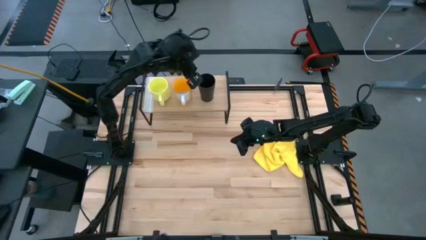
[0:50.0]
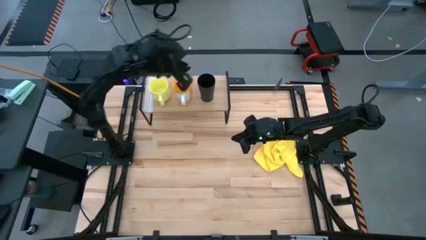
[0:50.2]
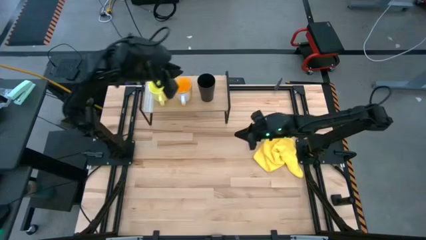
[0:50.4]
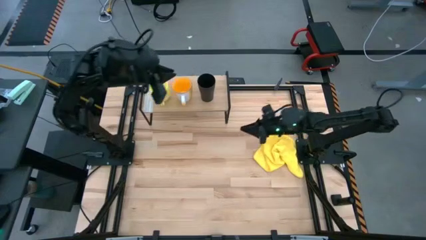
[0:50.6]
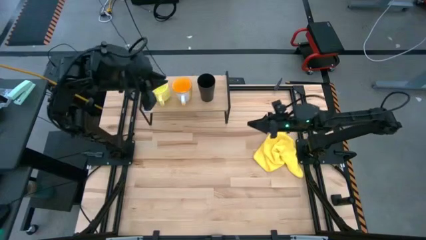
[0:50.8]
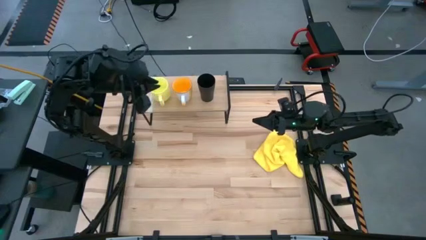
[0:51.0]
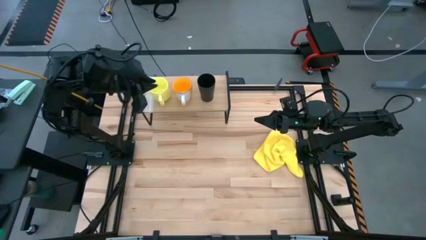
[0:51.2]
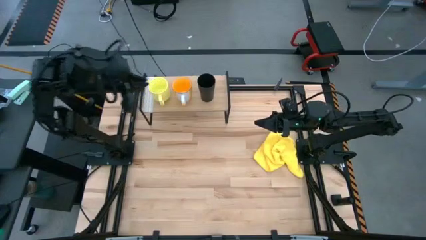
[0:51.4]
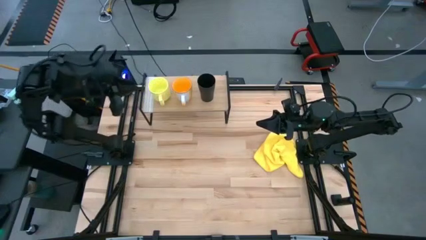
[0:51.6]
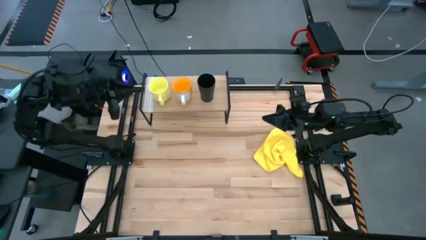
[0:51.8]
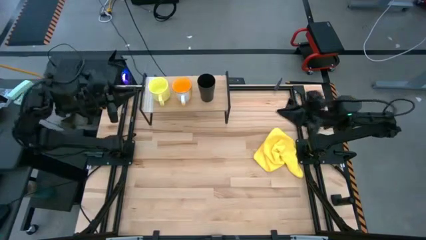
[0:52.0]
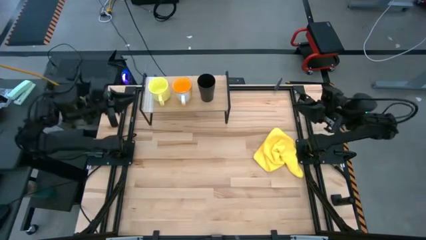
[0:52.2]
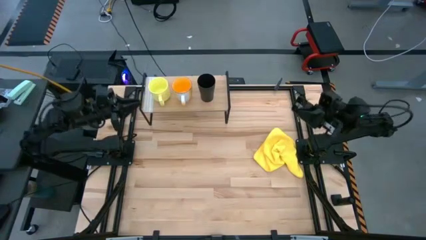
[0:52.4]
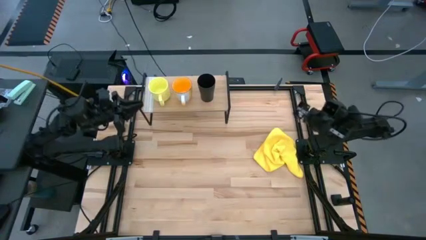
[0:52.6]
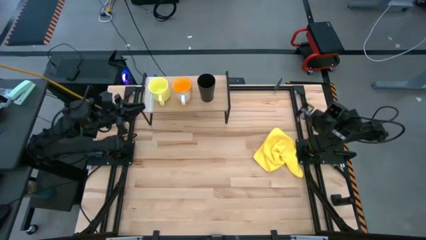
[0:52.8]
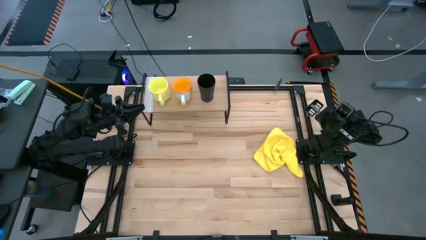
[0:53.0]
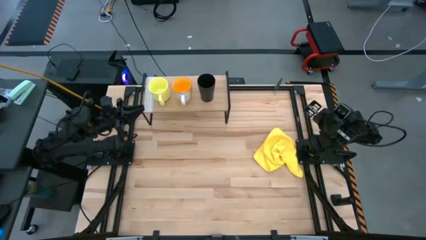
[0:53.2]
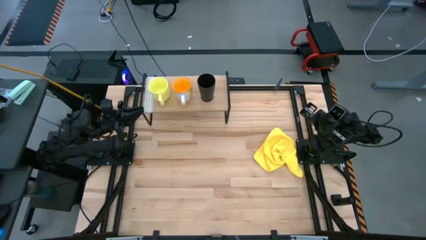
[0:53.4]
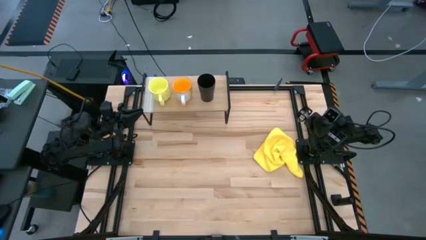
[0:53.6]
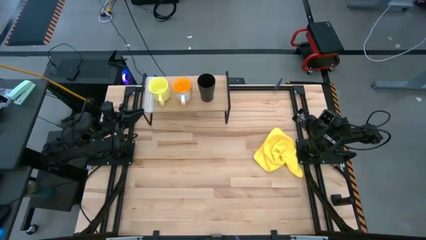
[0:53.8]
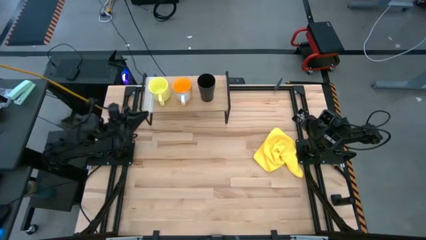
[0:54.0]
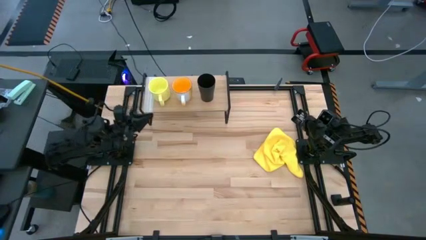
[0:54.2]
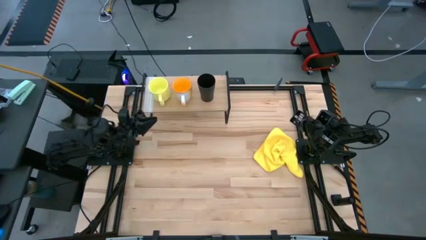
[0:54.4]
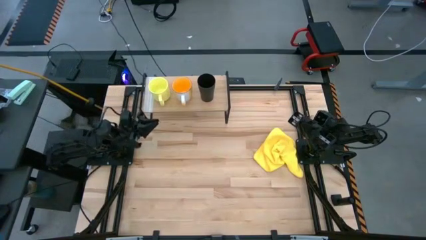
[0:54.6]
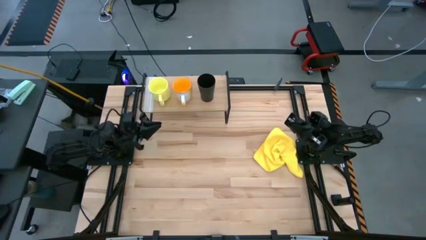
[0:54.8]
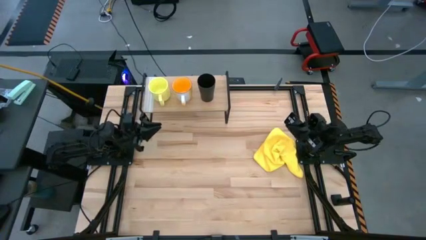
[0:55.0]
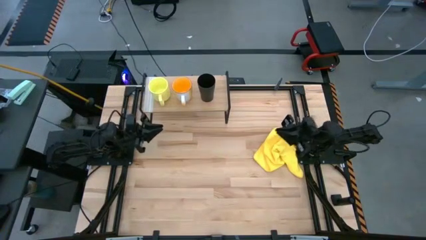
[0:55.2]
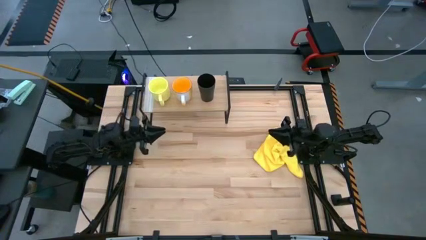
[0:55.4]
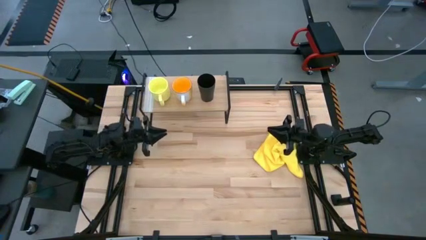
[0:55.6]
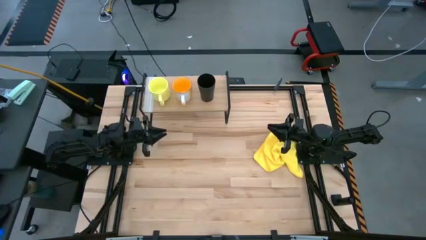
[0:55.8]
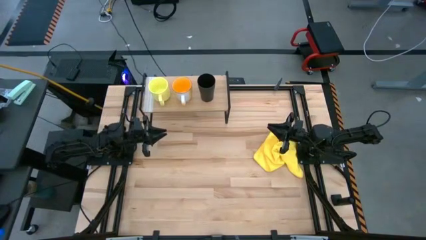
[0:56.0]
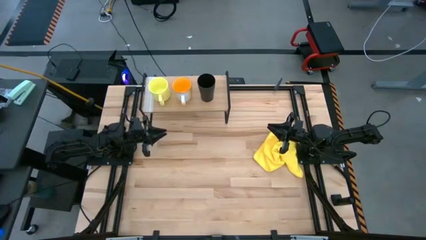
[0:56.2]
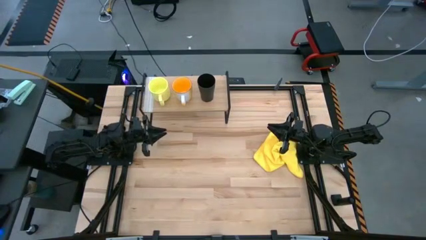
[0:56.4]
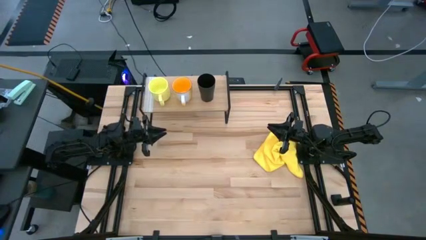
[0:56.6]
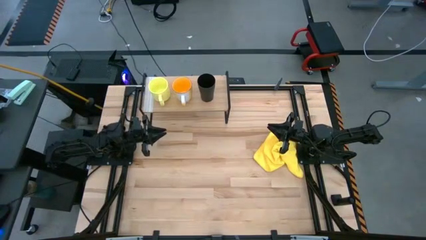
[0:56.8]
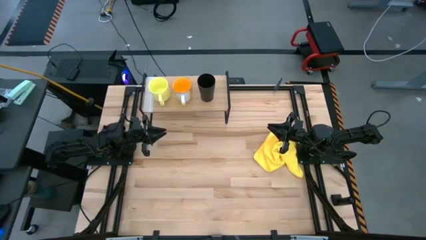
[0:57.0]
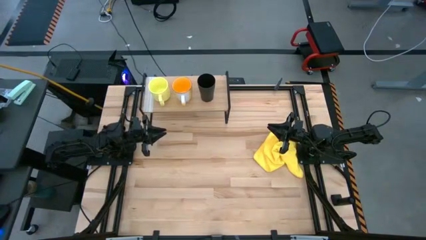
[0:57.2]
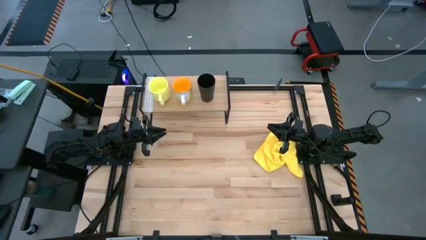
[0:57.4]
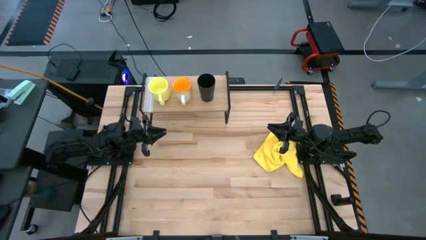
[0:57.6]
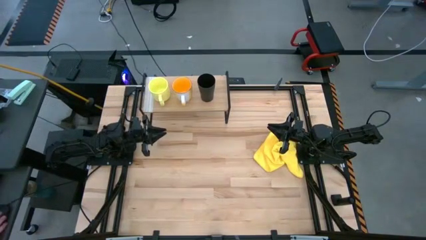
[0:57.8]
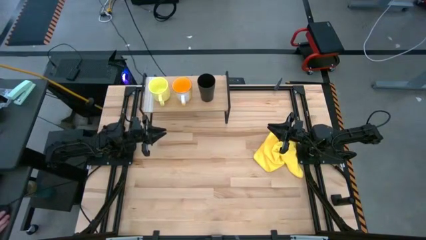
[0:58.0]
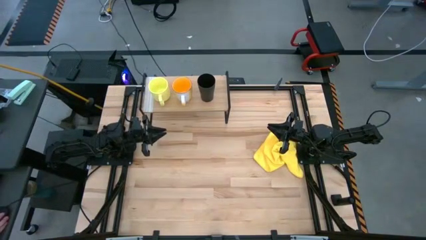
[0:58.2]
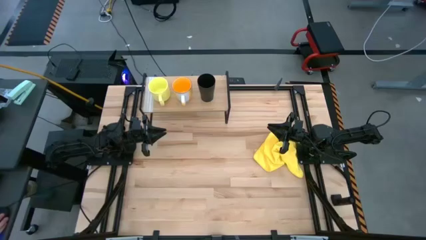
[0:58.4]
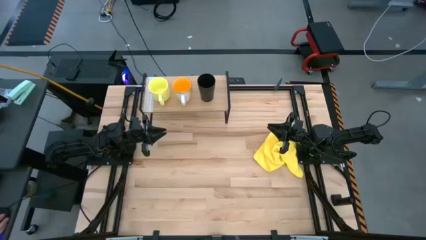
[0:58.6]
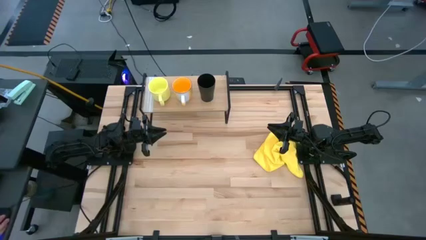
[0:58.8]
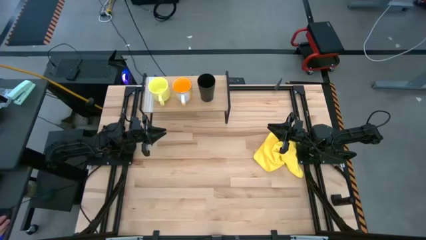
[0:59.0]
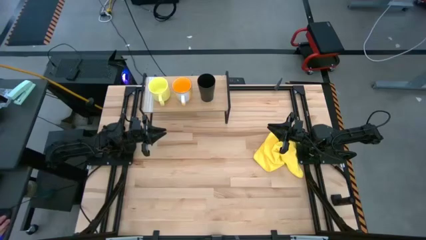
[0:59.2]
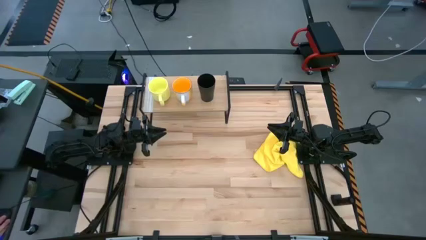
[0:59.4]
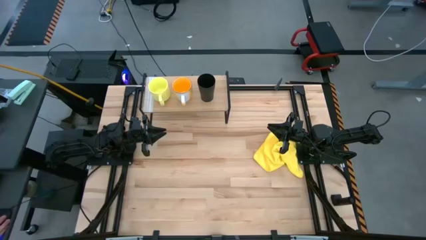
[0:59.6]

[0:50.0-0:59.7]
Task: Stack small to large cups/mugs on shelf
Return to Home Position

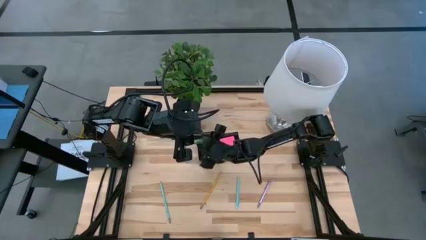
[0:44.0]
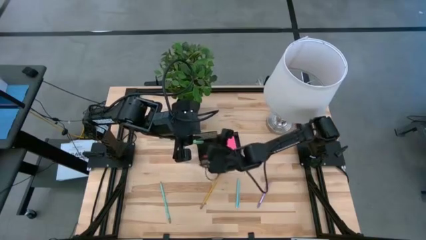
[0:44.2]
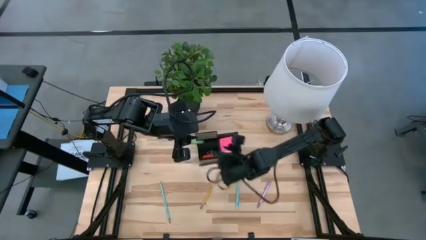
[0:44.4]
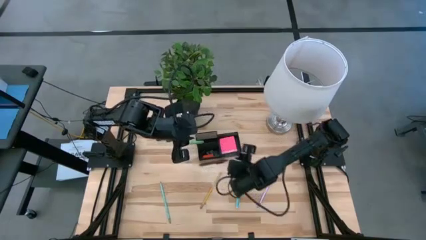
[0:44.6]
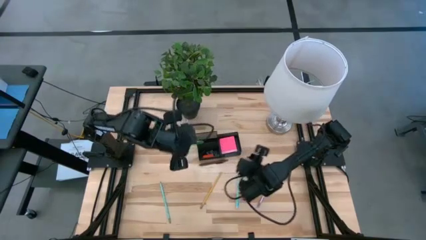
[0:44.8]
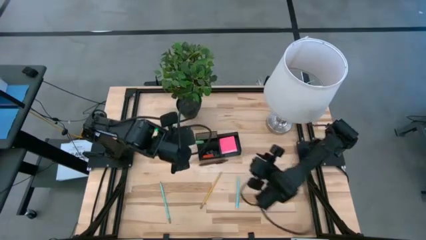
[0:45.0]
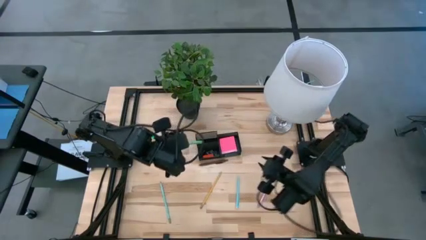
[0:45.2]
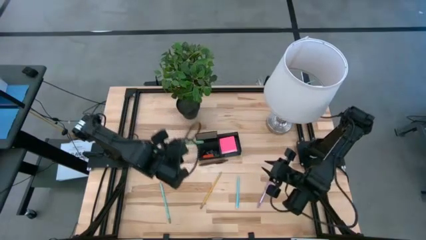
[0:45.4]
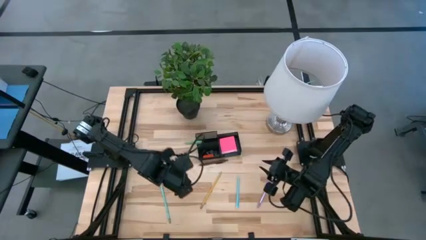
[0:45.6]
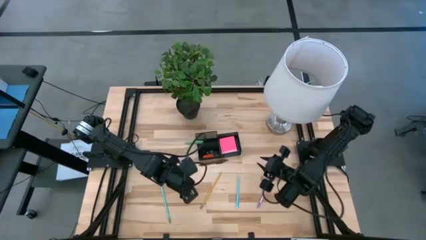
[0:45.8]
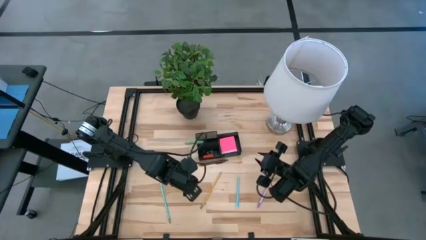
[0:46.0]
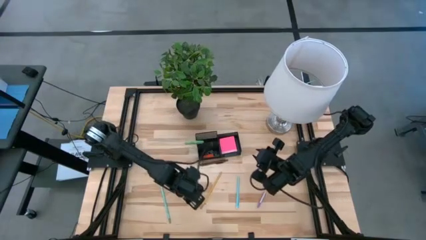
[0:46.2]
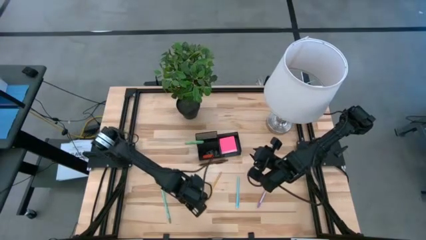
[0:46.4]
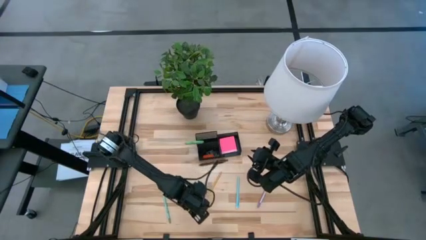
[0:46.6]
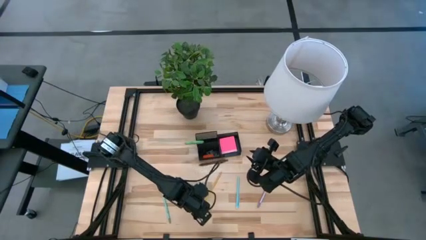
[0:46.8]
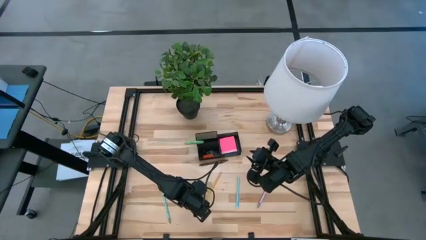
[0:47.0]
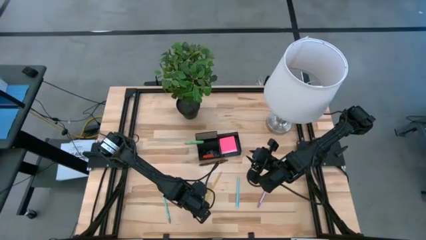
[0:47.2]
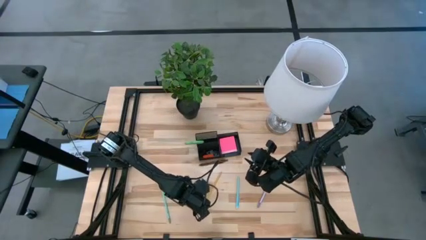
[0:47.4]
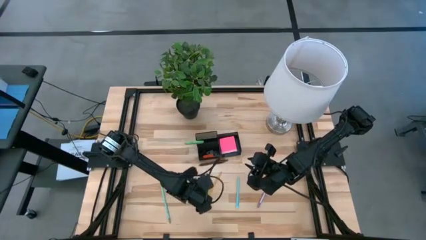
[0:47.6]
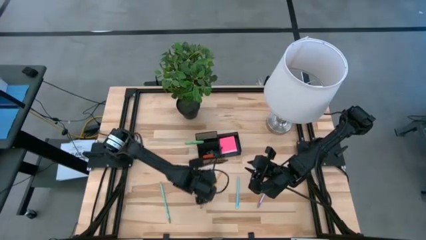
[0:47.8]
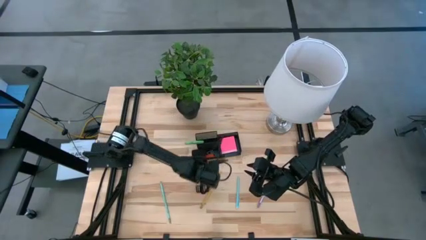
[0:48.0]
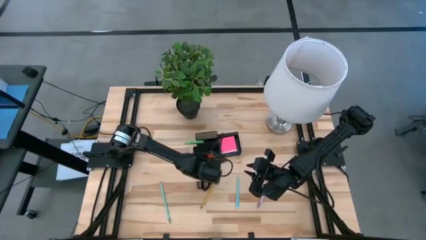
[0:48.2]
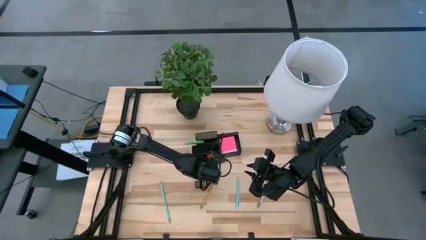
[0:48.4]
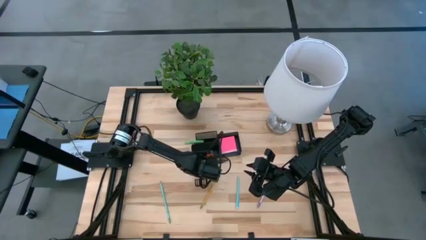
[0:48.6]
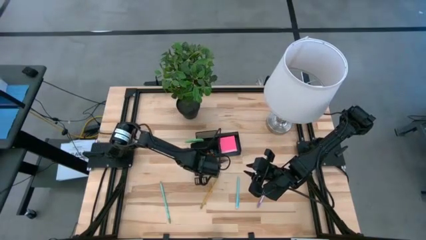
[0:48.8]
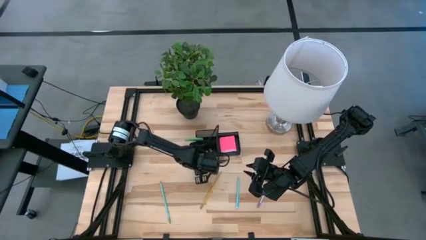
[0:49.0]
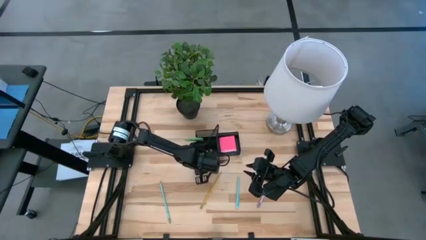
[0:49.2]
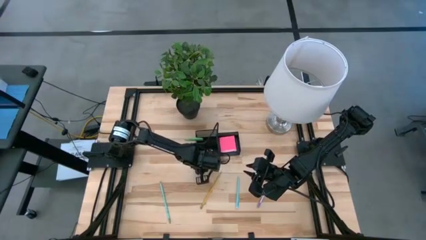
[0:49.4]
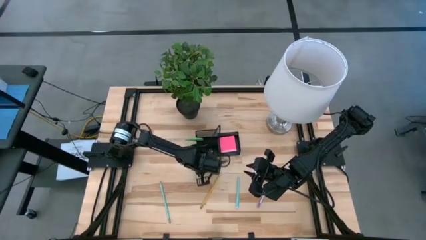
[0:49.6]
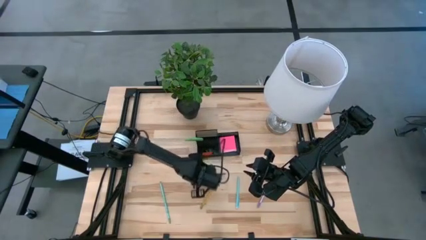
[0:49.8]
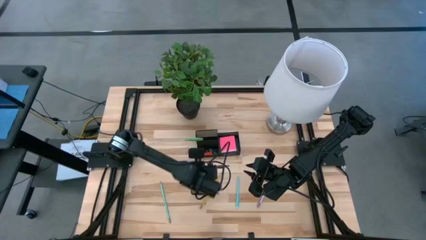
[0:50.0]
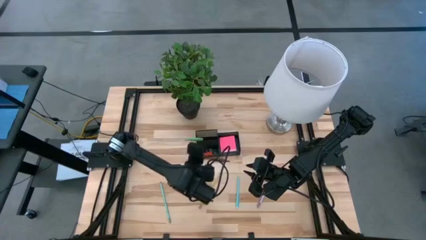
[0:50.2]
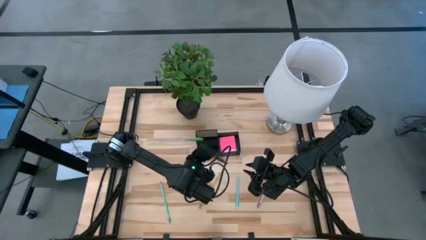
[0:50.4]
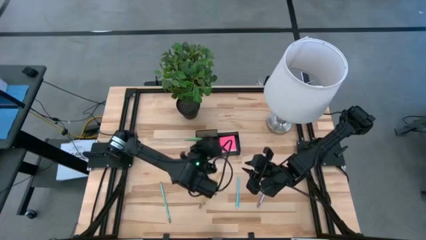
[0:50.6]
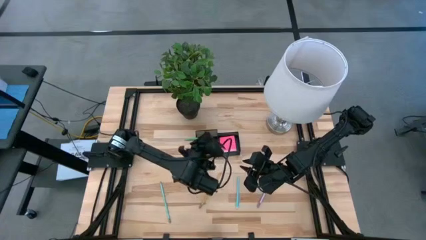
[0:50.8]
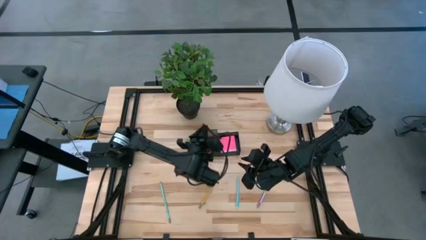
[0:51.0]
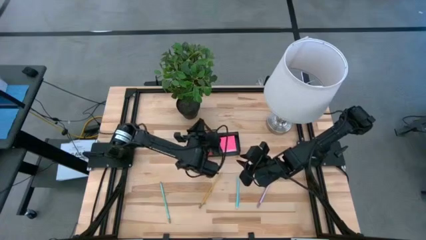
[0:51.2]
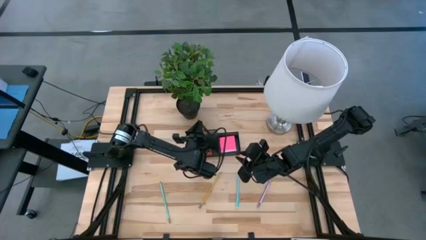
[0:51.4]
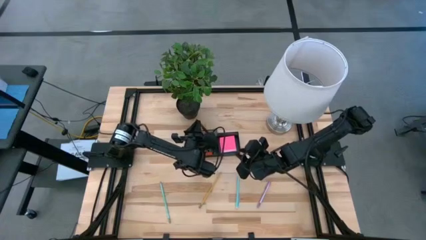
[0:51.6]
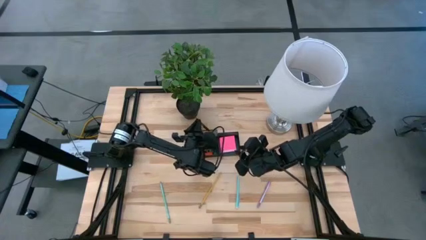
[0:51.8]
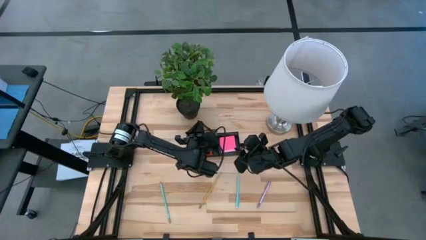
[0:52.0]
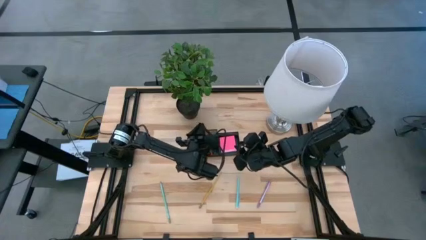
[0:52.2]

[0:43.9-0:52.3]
Task: Pick and place office supplies into organizer
Put the brown pen into the black desk organizer
